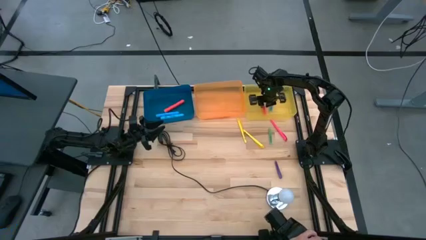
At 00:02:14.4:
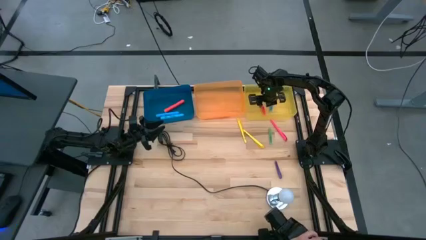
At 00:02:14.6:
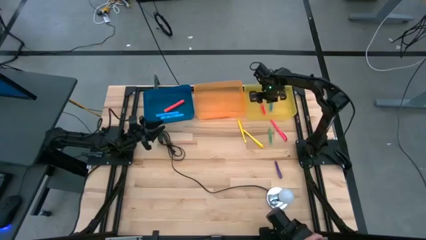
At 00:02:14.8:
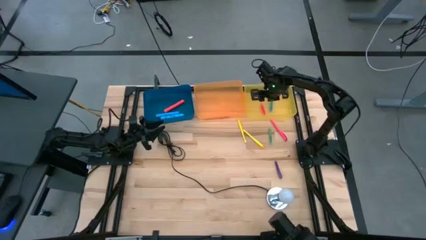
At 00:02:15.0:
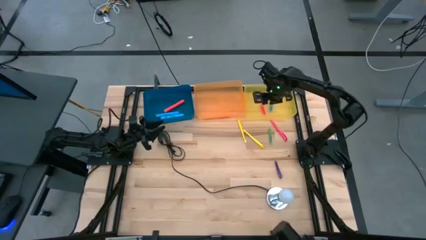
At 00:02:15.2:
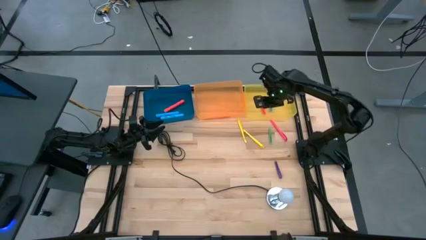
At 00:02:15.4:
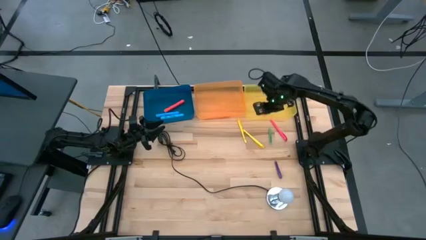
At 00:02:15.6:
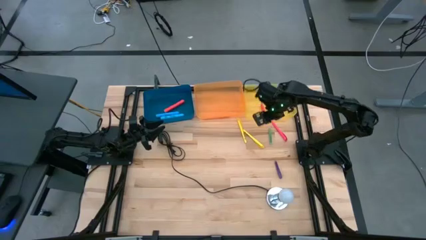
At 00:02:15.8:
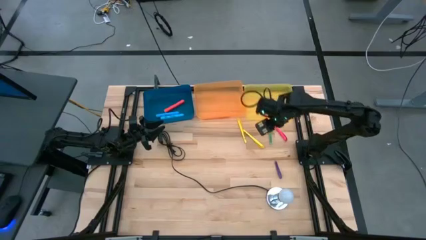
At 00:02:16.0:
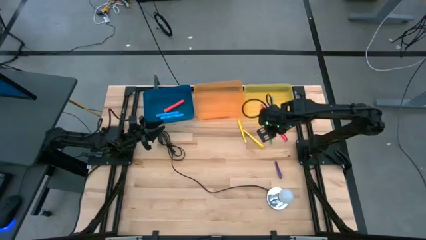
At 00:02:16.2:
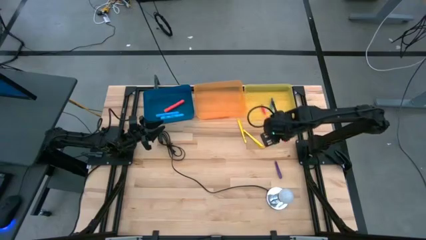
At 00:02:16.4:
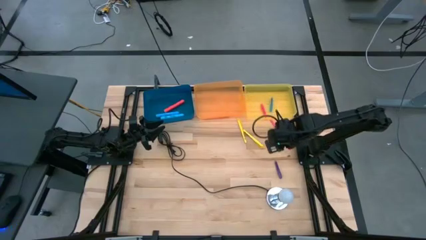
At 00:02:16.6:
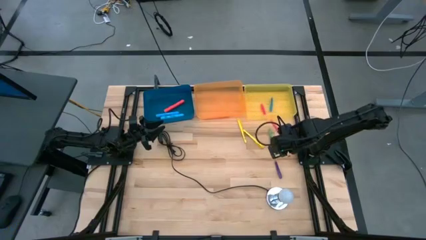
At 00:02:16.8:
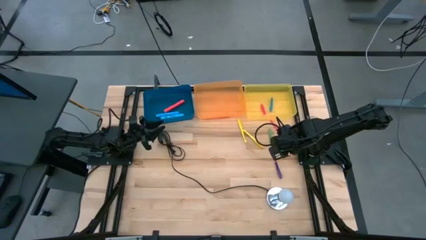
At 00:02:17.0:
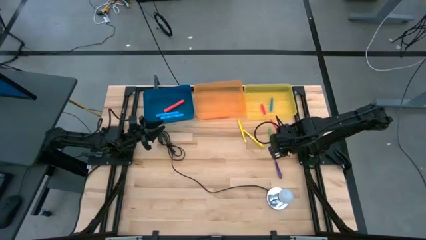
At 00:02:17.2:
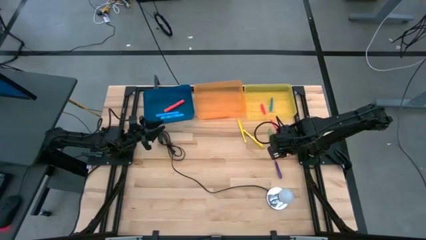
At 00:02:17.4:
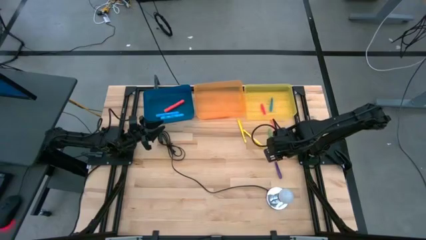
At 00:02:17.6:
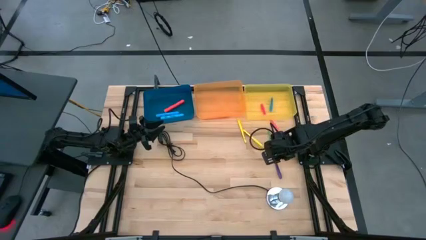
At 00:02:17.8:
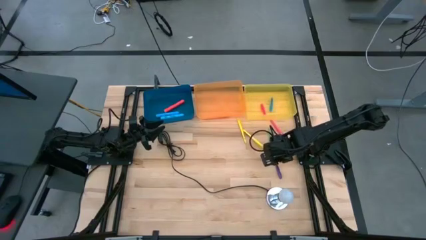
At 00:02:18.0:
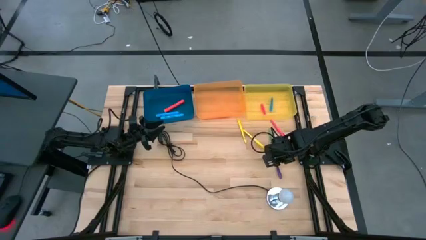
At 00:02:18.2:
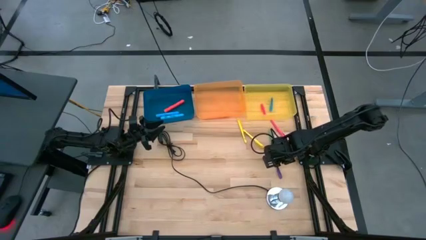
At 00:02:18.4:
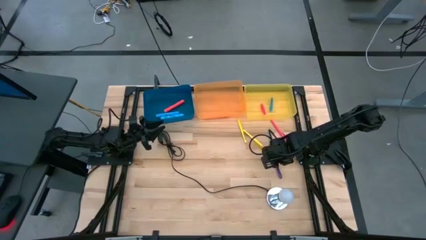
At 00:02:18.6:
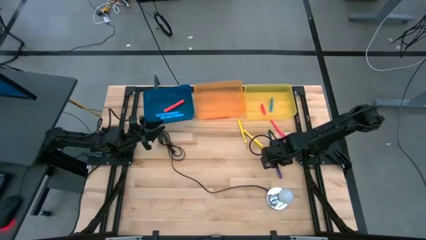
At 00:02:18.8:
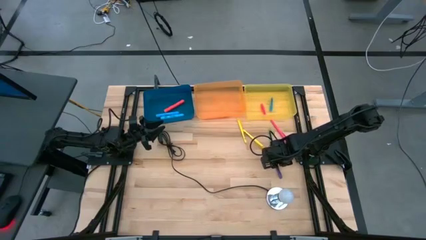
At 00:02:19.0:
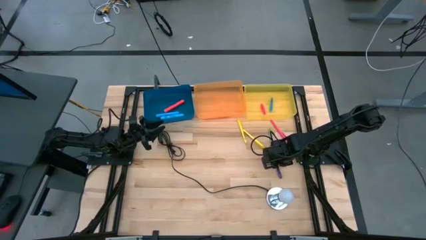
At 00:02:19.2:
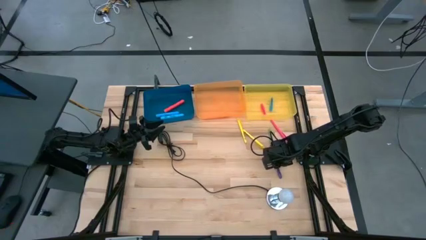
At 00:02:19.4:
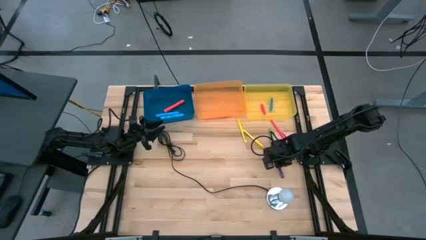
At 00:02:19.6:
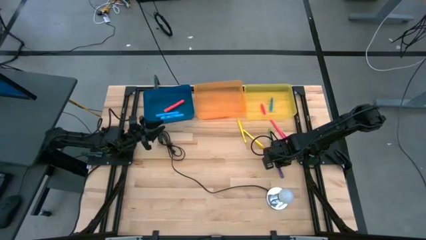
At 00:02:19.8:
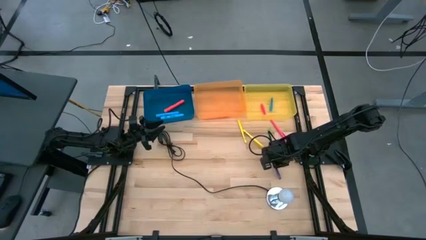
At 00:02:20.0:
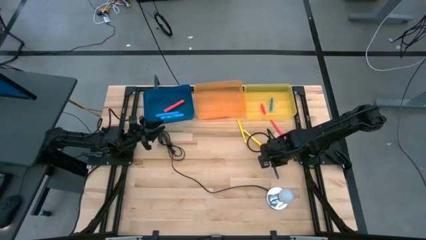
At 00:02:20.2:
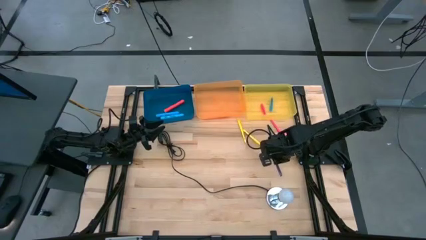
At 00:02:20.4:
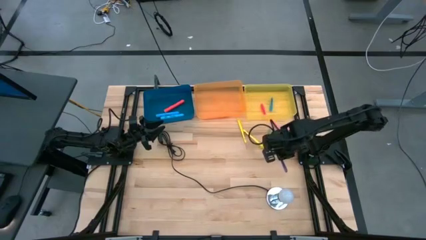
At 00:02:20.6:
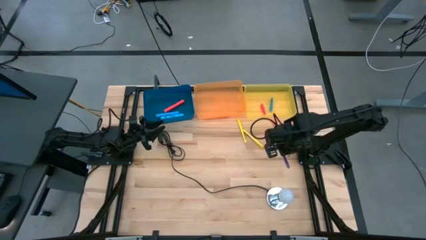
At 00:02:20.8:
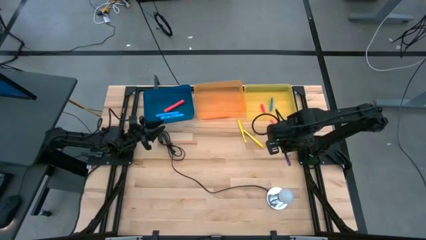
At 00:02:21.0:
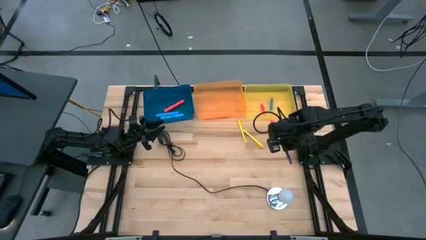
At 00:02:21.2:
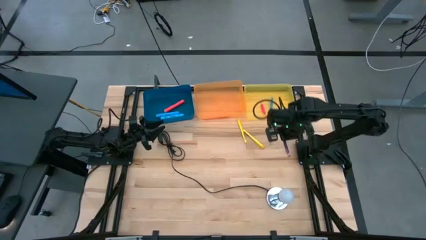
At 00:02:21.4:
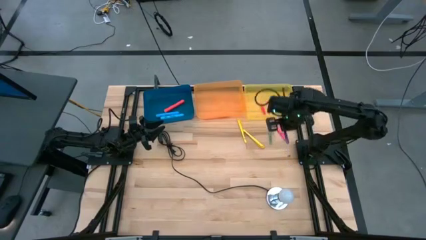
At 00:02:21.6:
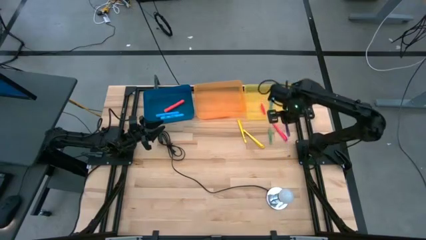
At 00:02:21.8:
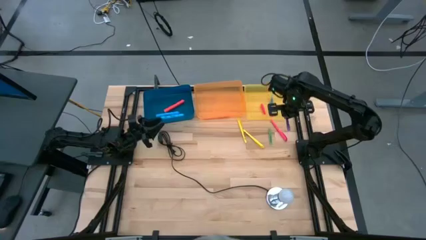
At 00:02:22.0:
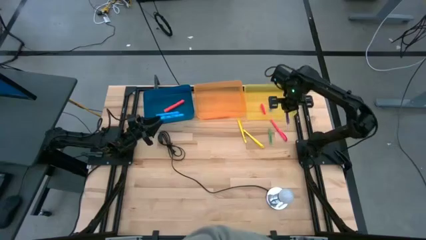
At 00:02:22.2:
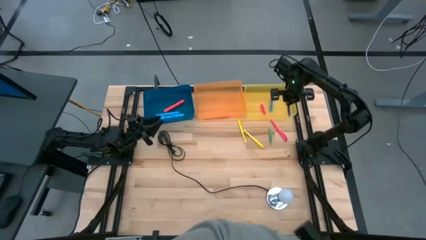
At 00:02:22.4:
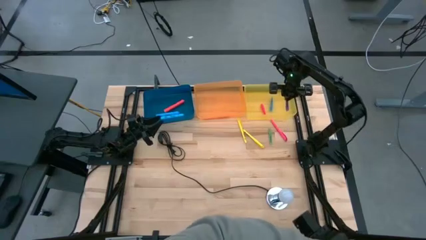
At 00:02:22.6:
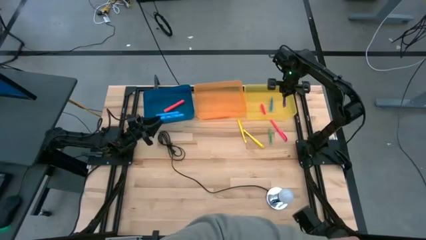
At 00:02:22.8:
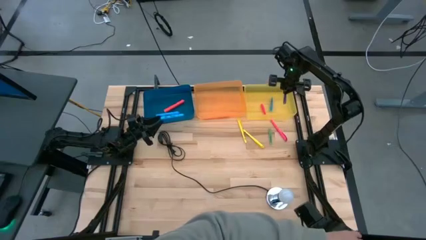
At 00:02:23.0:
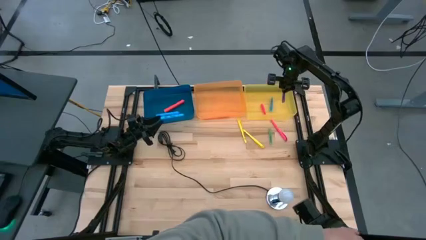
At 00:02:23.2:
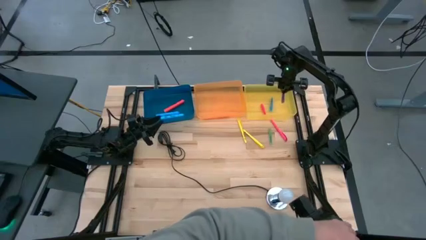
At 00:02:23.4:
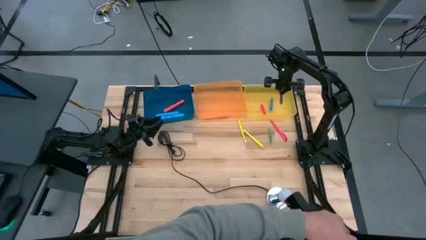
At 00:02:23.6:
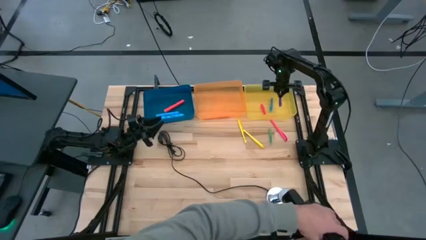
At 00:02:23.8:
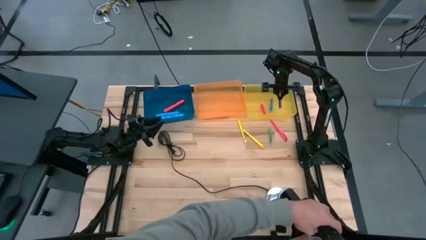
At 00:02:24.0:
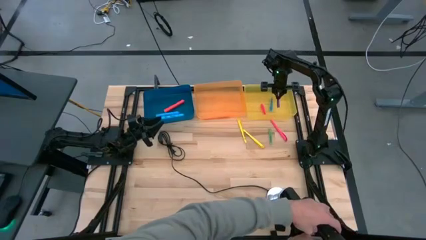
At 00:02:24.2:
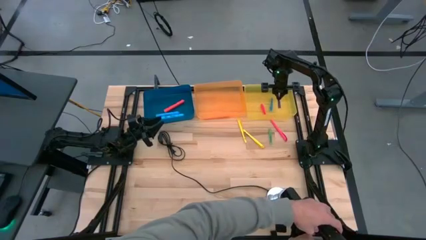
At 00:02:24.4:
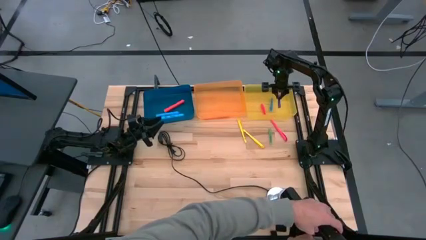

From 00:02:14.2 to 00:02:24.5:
Task: Pick & Place Markers
Put the small violet pen into the yellow bin

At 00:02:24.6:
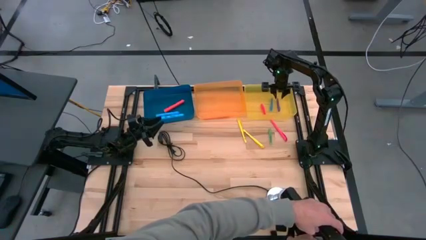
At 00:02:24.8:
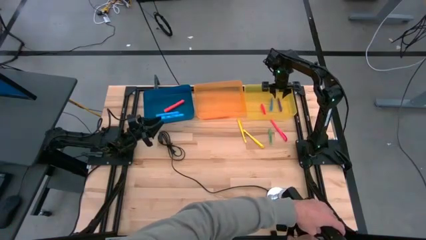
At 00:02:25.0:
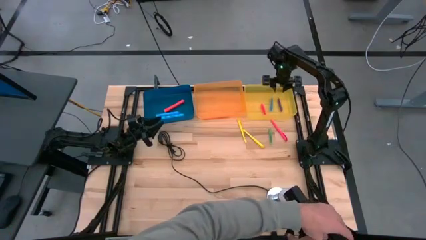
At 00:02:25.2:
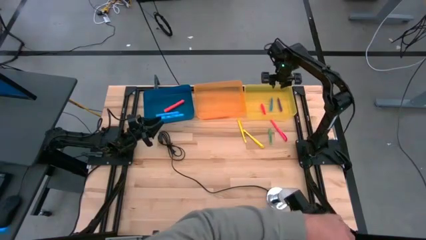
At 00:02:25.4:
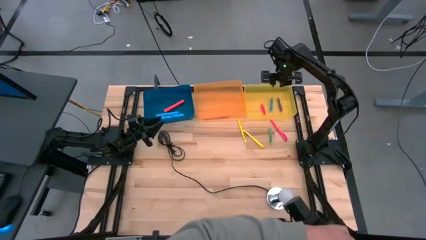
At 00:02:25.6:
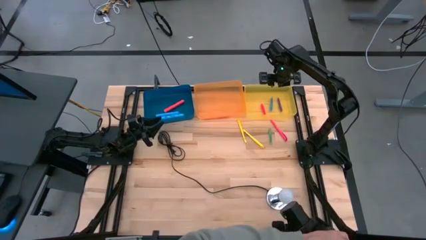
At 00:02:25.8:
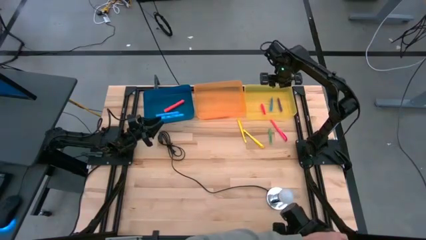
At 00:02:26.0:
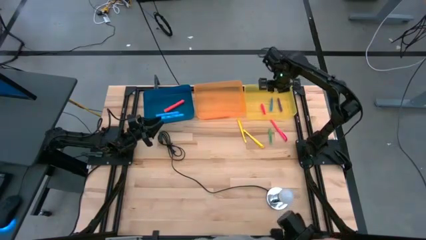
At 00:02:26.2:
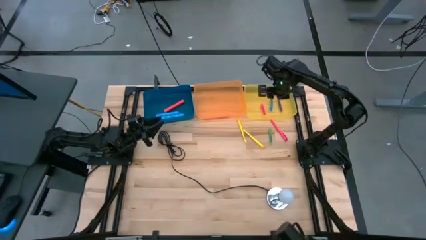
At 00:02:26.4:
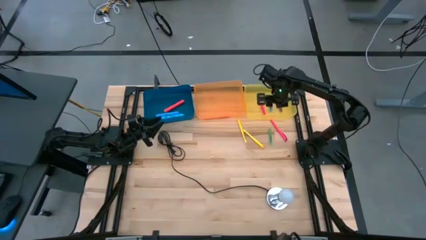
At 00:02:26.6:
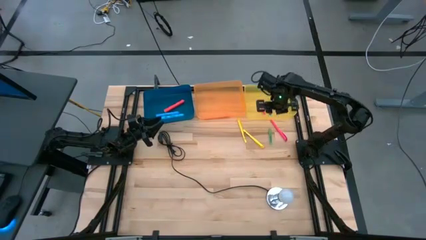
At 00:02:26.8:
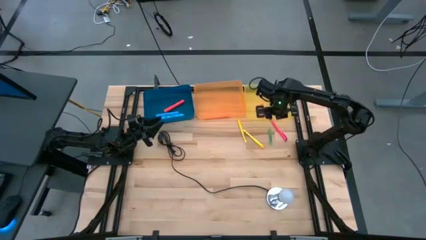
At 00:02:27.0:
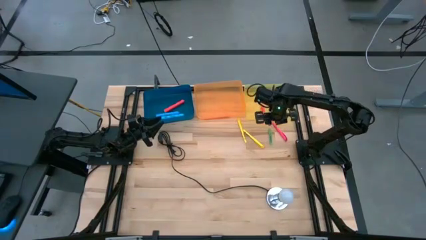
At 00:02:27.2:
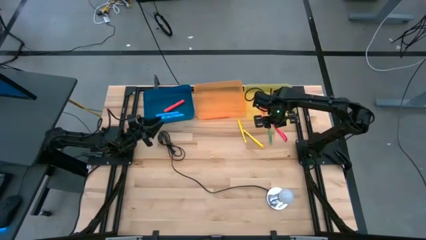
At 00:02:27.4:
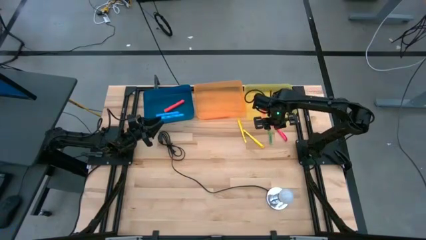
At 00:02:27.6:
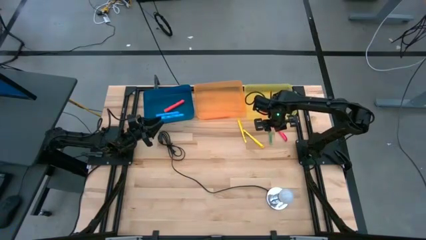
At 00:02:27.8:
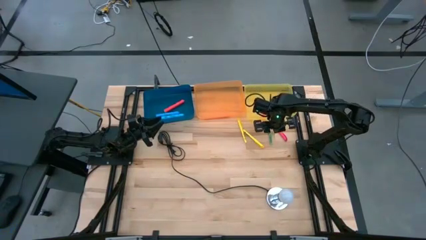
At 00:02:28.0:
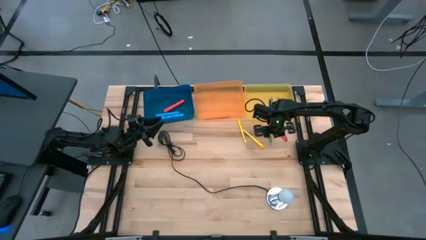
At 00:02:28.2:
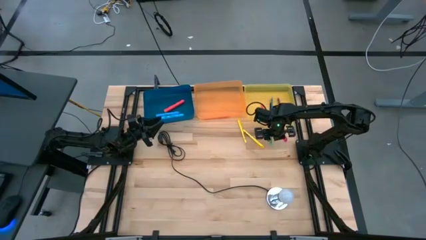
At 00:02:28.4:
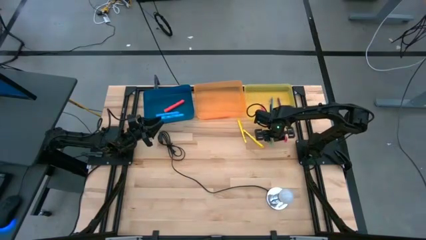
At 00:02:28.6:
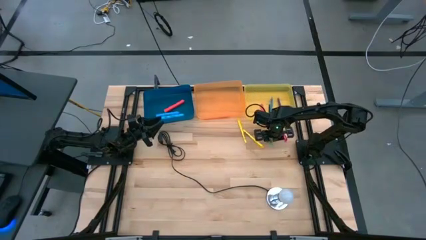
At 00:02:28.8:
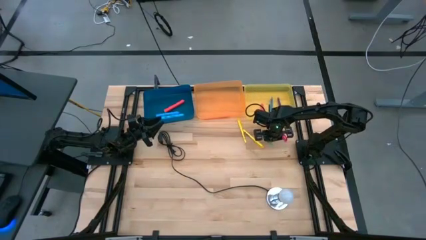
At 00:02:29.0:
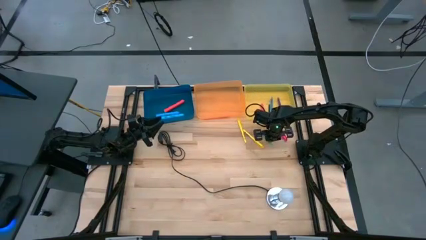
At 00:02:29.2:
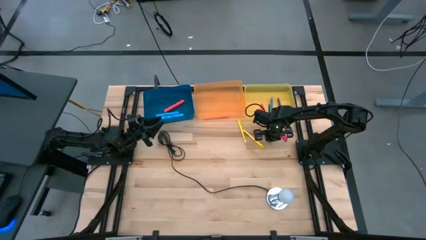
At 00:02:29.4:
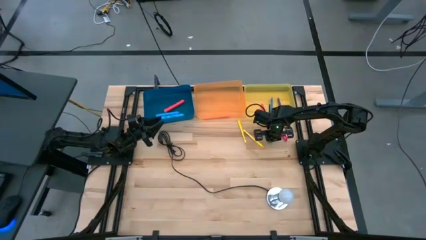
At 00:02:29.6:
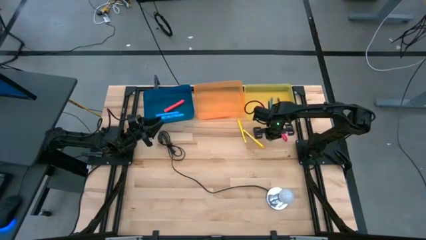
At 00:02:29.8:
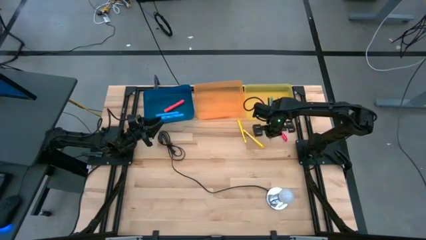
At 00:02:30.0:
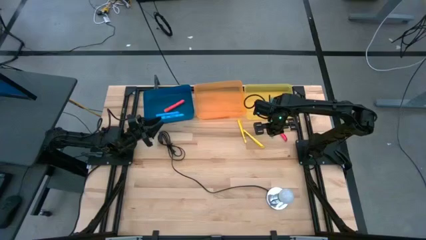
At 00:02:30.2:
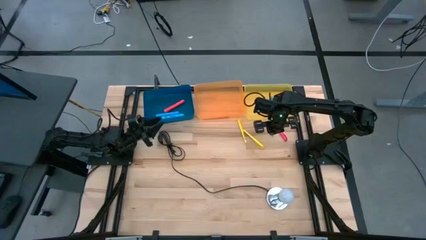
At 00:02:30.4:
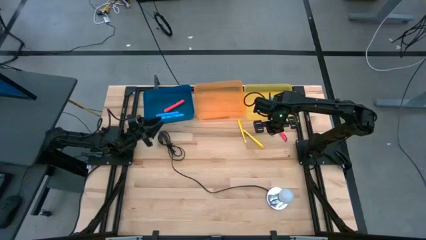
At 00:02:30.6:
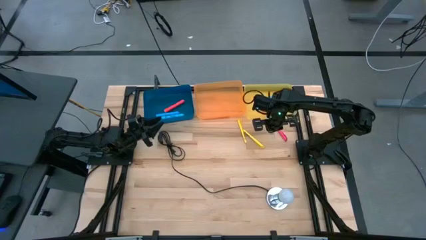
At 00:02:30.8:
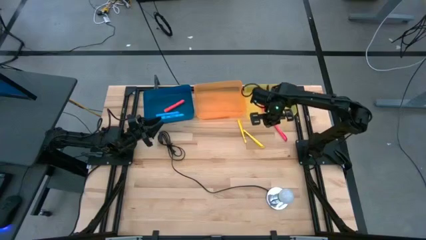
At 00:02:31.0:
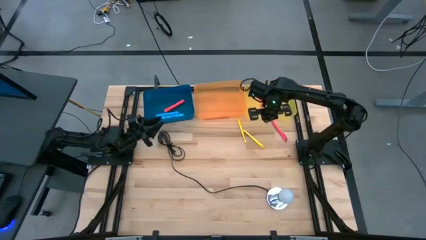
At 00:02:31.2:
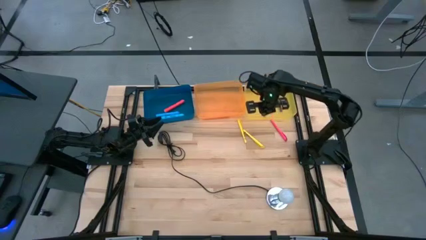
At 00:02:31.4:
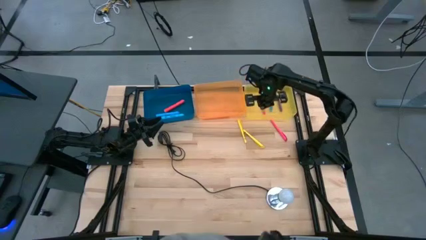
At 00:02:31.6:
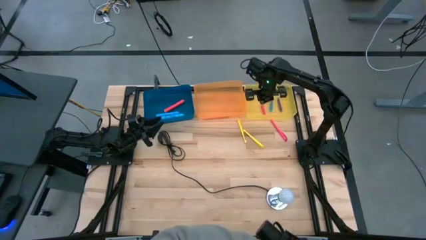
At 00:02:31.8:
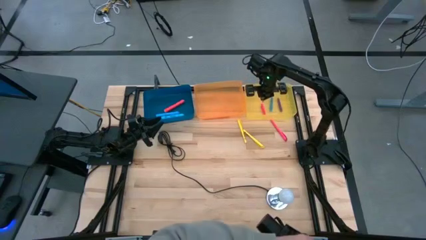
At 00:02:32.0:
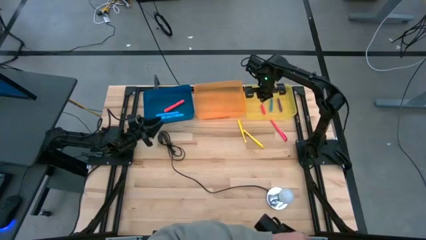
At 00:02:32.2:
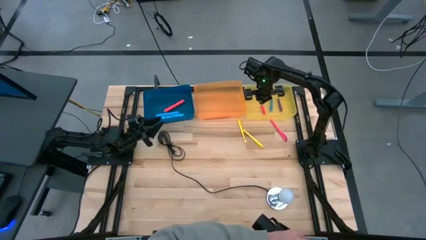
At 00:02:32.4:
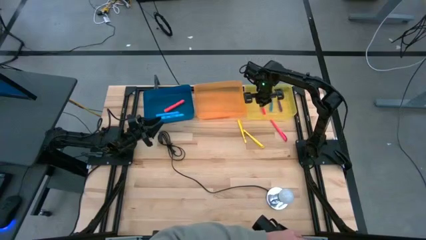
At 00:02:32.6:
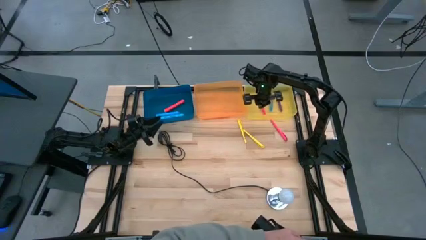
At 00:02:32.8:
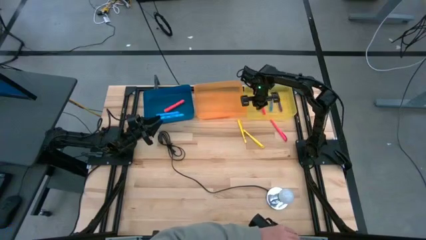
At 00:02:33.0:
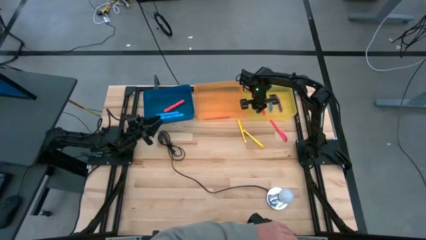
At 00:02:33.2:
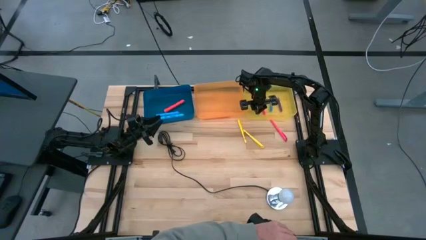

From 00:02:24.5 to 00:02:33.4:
Put the small green pen into the yellow bin
